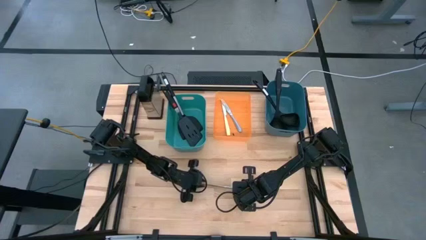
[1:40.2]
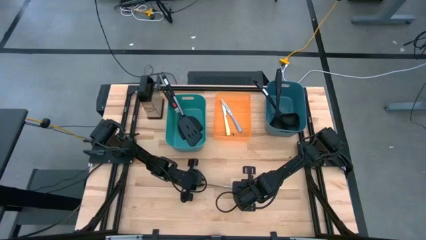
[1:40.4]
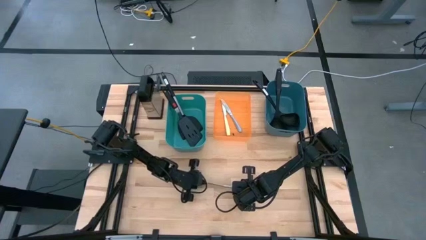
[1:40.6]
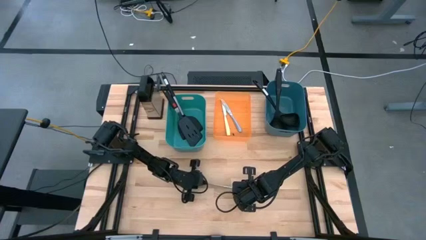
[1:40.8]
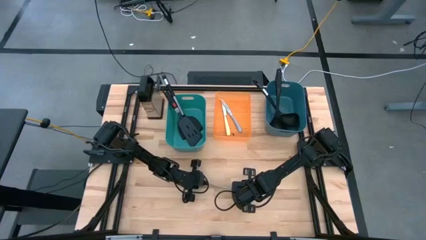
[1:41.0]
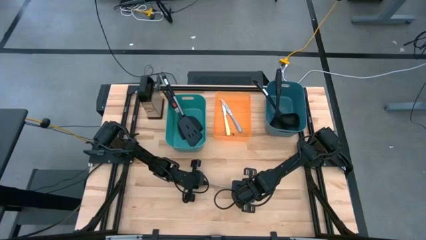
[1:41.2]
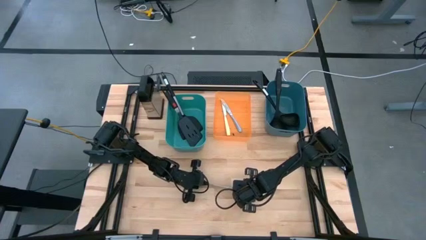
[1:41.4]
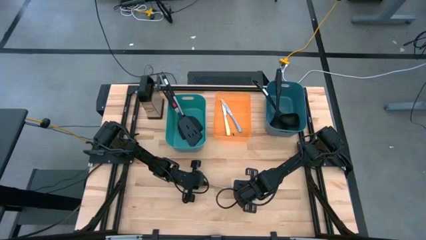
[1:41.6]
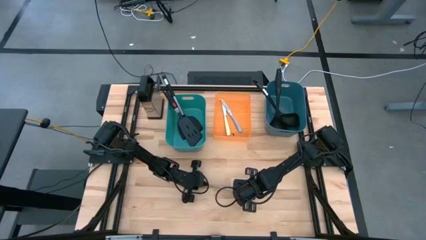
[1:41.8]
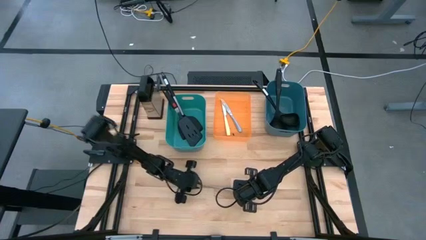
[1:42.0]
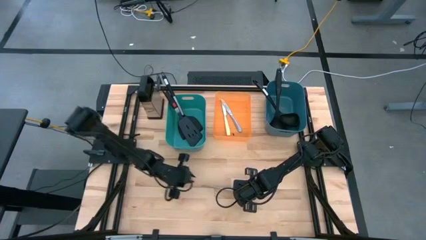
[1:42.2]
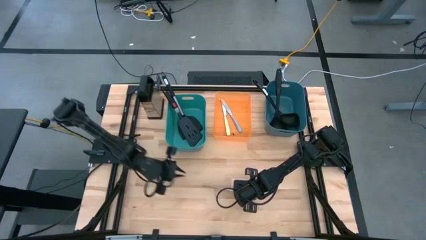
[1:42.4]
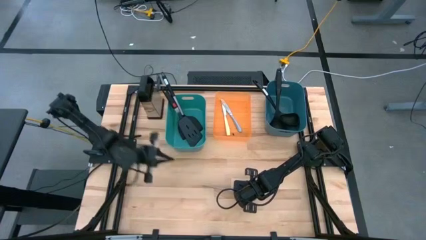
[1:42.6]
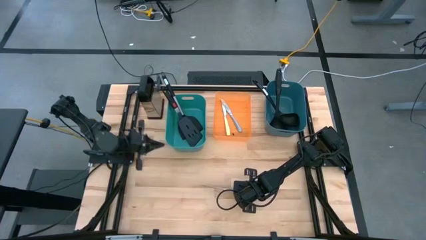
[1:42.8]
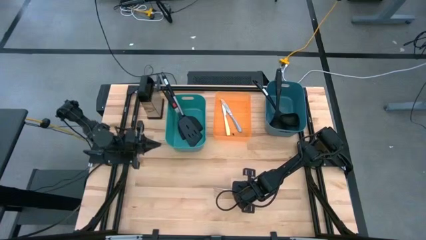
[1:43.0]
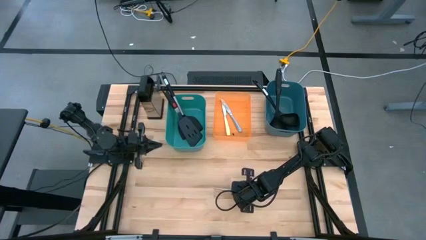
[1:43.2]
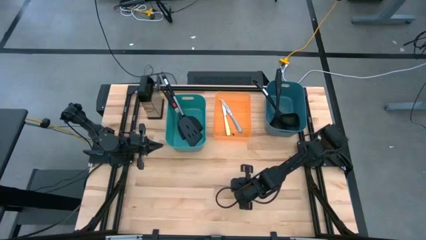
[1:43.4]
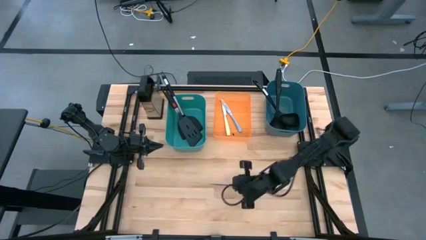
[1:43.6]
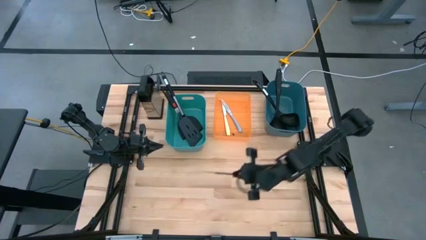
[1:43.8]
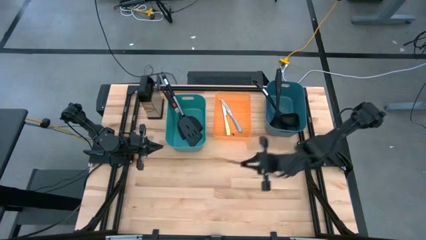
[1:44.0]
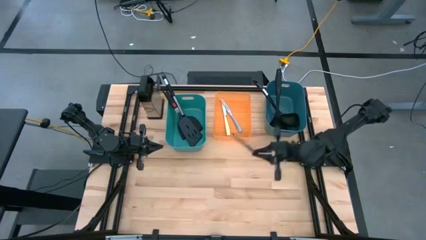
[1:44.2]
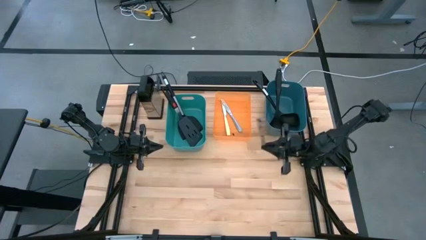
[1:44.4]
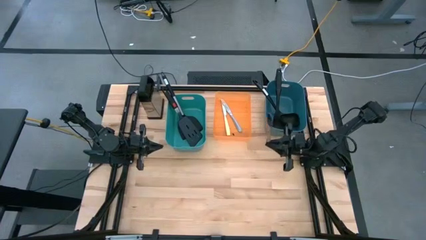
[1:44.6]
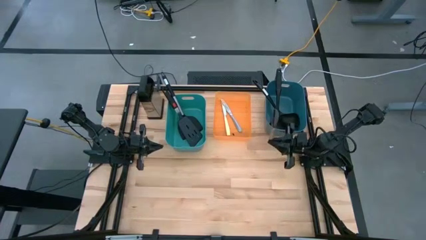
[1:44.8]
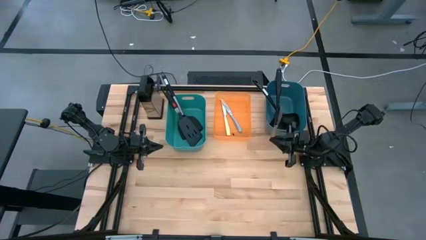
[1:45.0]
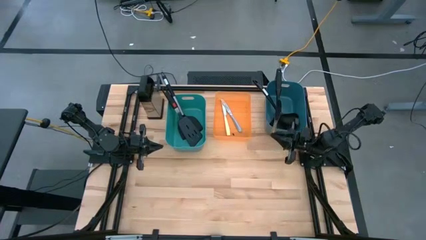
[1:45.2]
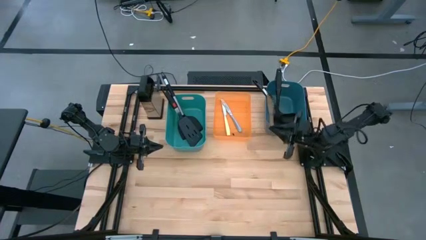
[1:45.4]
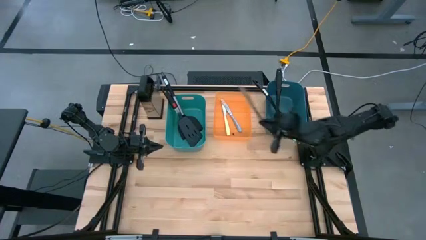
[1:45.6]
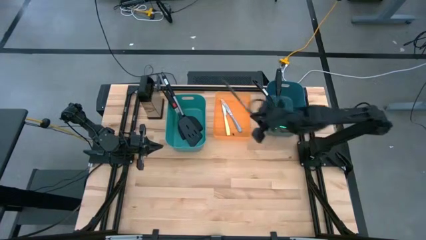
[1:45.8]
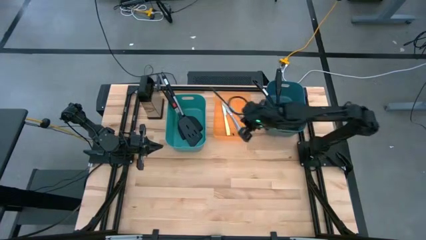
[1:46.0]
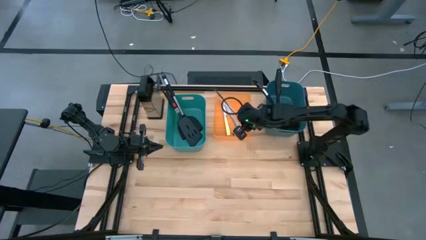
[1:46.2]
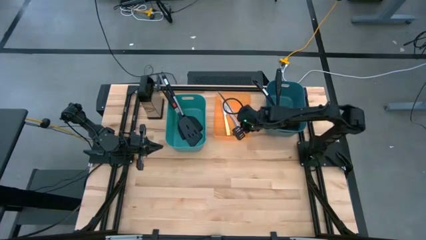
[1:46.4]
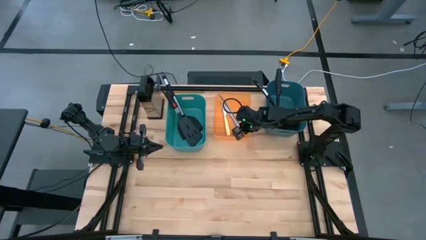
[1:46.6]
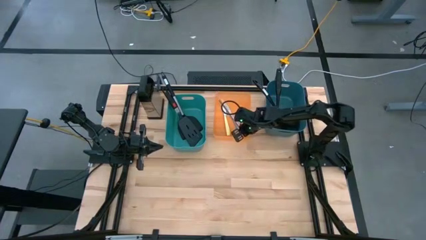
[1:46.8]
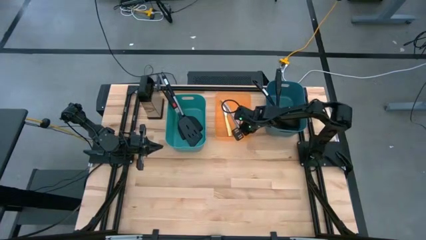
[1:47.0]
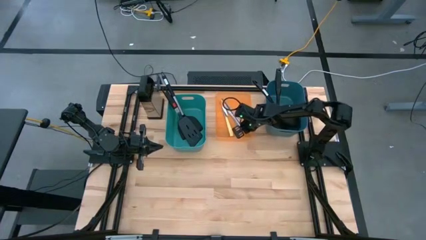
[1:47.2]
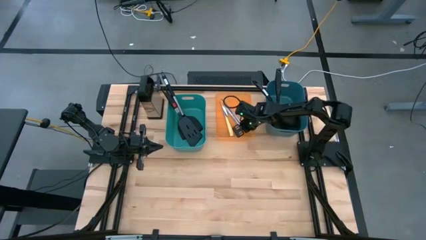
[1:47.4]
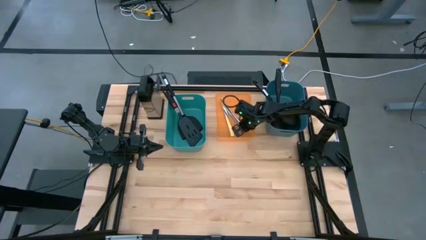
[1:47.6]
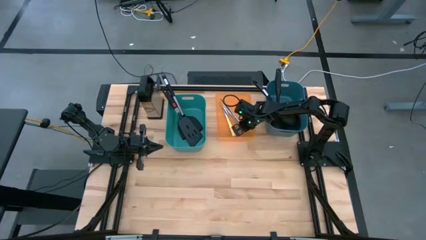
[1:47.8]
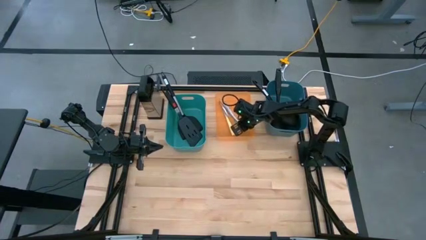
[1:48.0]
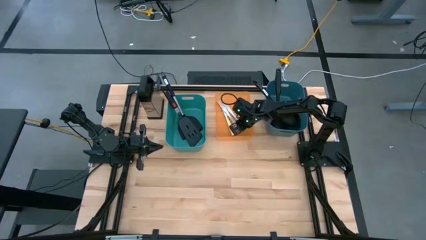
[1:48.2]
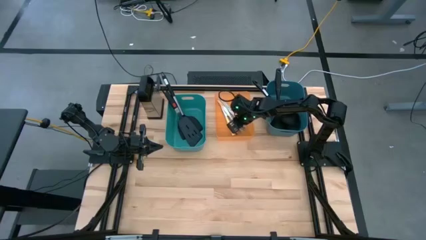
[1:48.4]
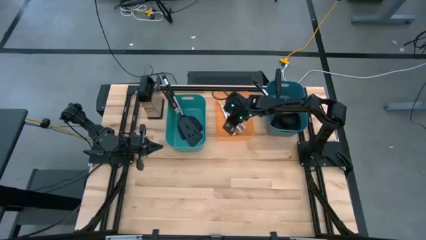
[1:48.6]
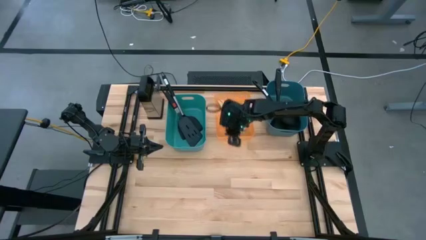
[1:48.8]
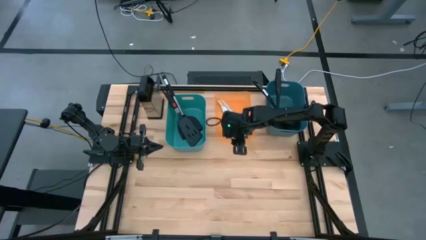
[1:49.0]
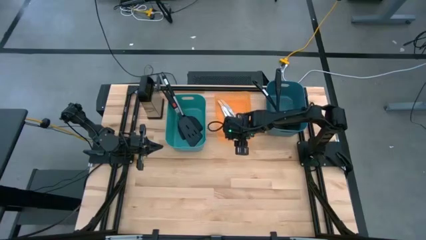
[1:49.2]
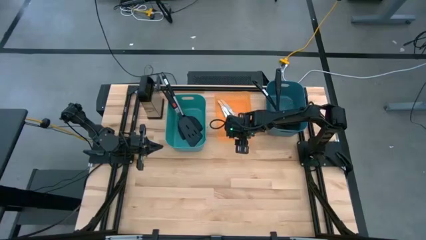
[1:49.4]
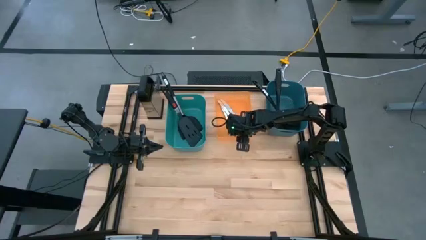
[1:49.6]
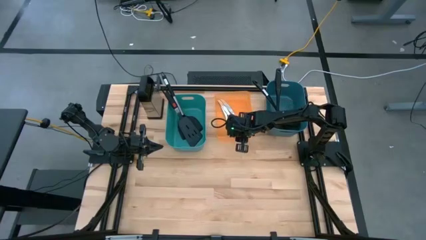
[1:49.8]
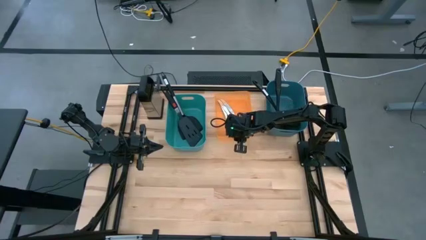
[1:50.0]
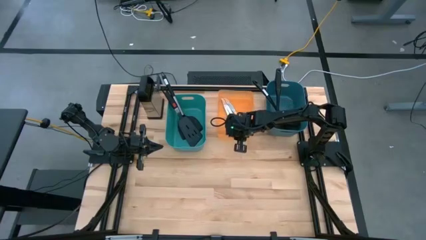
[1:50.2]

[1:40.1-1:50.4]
Task: Pick & Place Kitchen Items
Put the silver knife into the orange bin

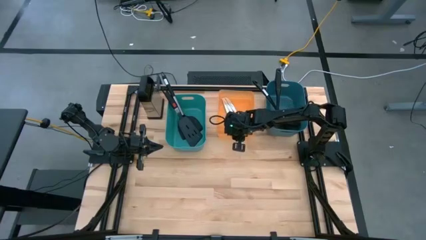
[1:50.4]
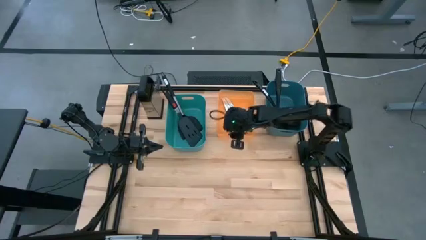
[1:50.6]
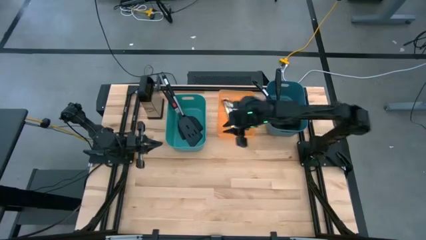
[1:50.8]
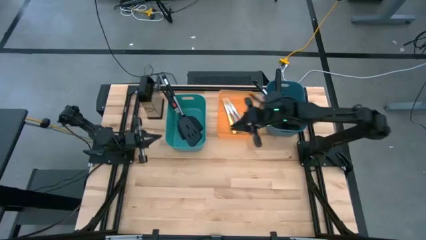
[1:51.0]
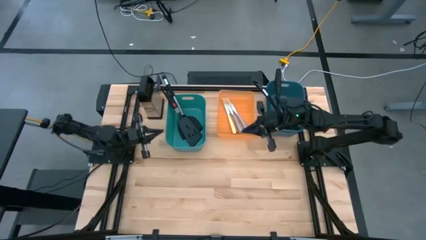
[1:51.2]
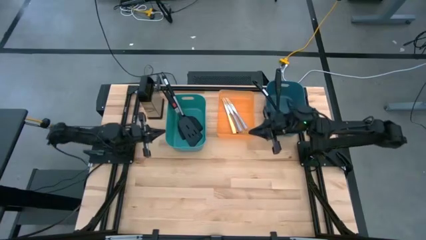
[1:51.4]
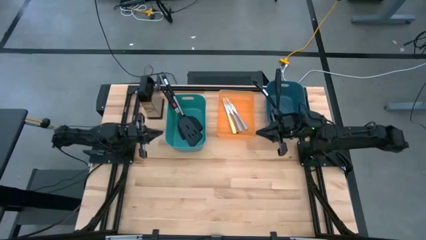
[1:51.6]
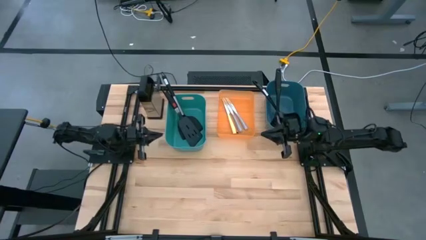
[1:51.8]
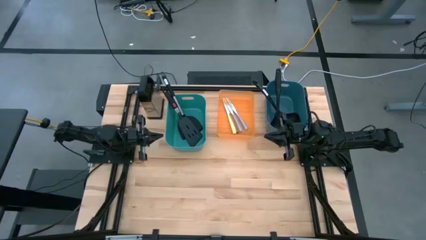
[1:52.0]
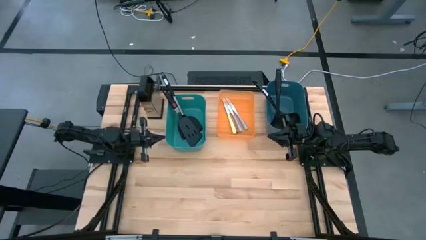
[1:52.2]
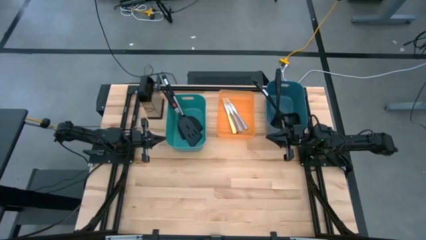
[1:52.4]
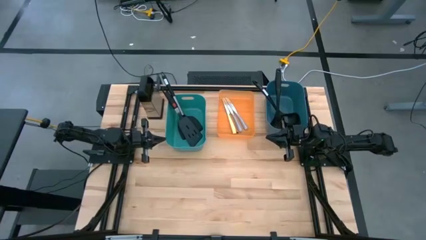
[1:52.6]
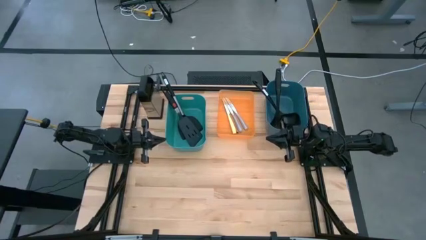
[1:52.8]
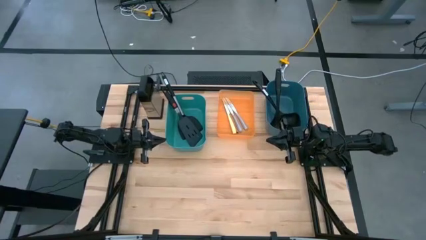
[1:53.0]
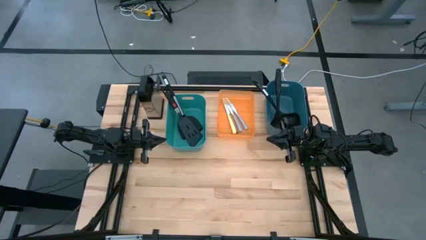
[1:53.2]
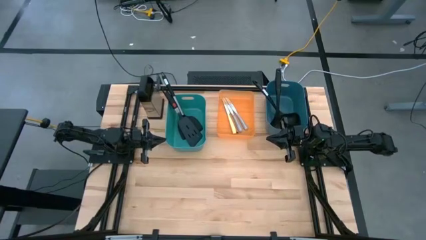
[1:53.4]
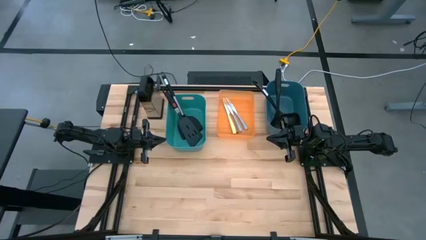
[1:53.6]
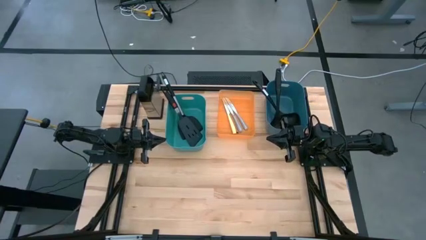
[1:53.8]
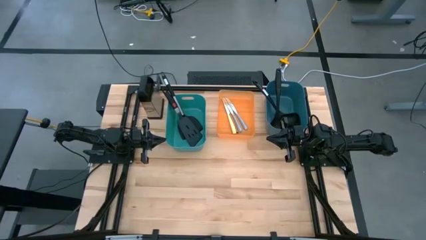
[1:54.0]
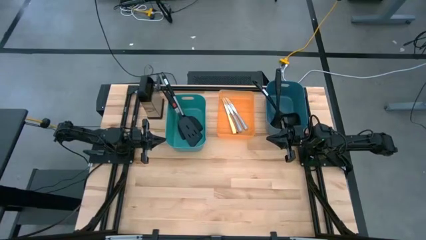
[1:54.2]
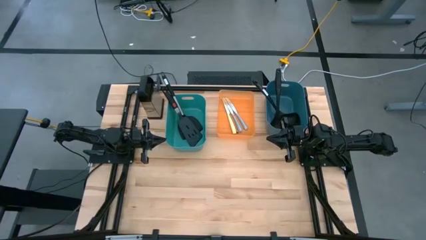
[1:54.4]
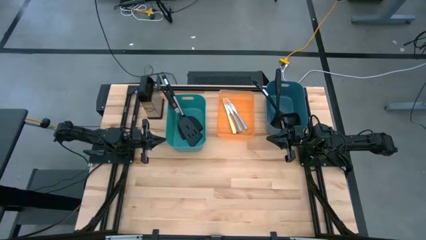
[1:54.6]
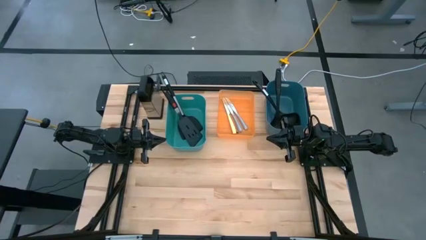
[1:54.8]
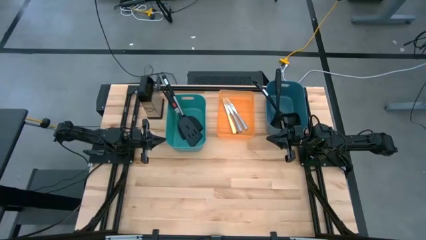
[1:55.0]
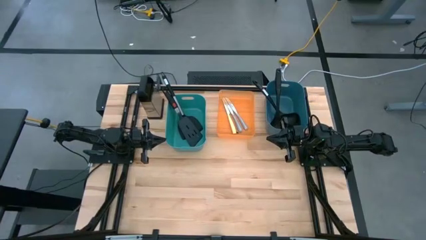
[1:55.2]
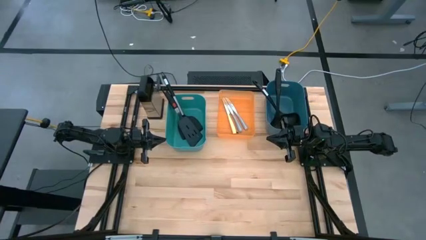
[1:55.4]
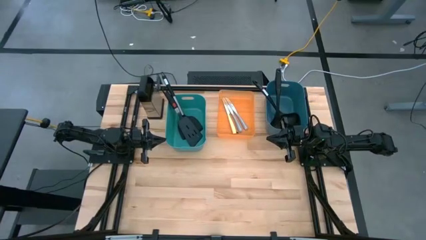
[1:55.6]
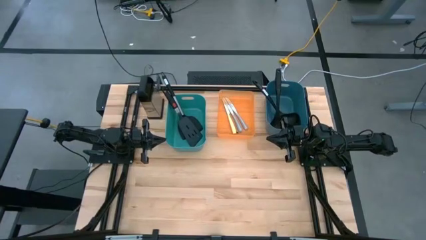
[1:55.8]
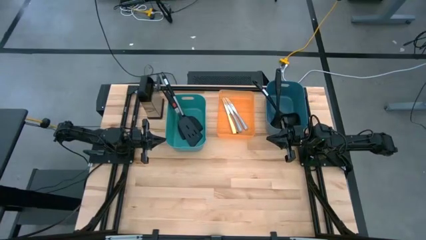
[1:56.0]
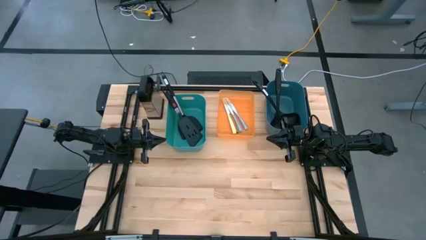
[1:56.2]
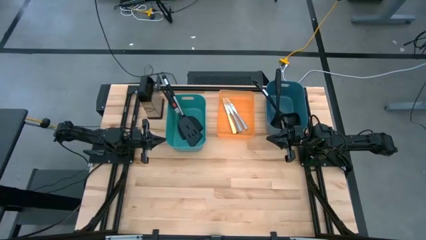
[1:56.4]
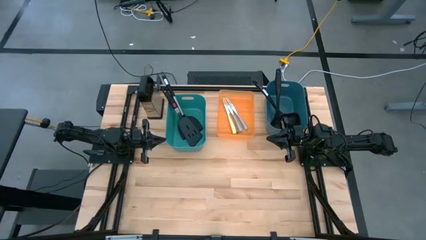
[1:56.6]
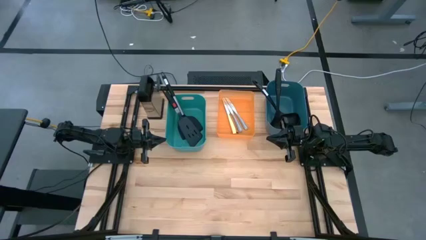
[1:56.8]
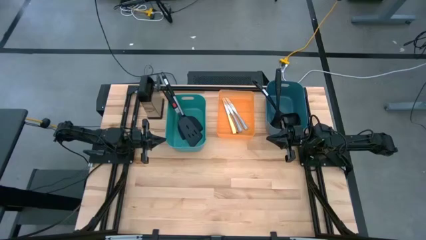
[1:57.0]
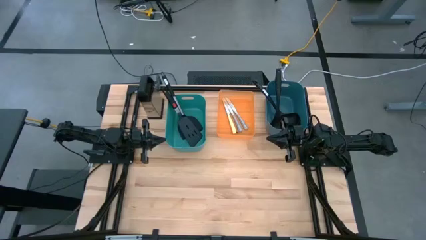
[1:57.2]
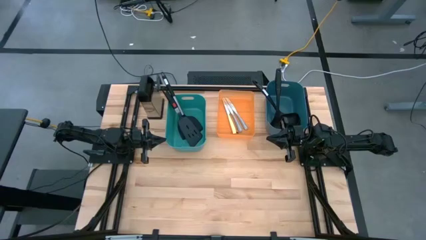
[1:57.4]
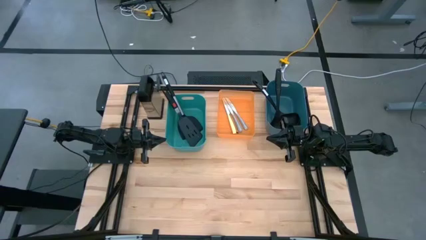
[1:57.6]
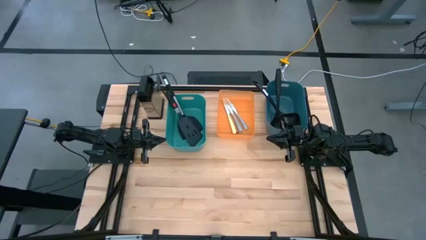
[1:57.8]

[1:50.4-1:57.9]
Return to Home Position
